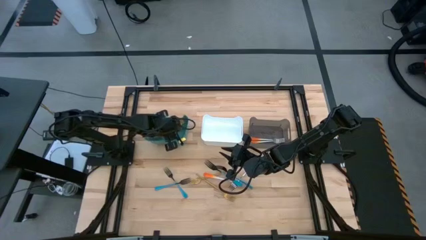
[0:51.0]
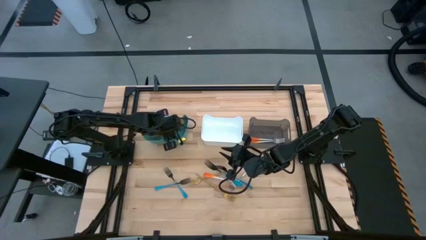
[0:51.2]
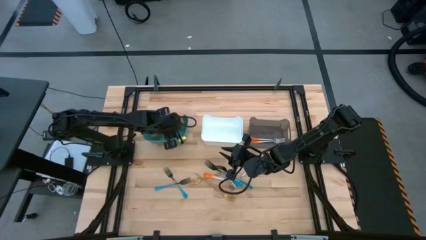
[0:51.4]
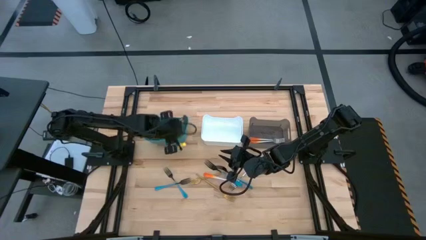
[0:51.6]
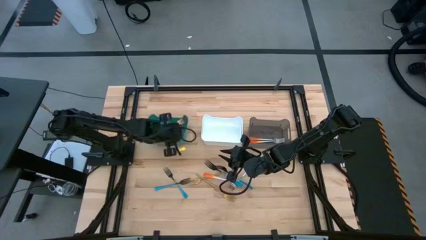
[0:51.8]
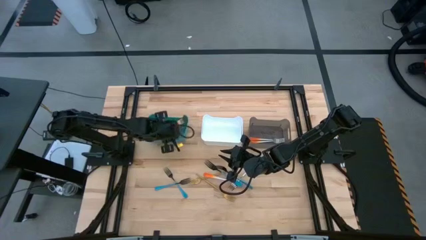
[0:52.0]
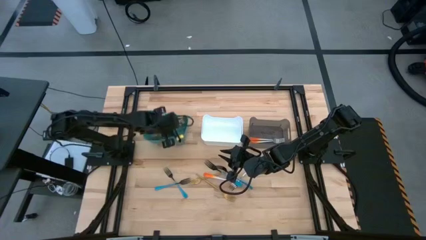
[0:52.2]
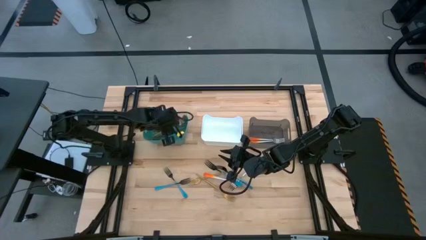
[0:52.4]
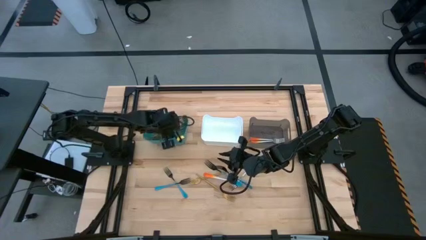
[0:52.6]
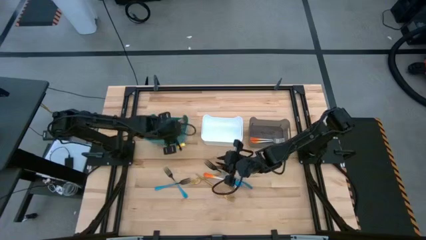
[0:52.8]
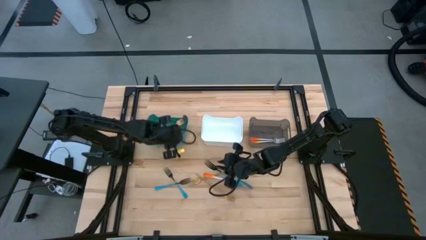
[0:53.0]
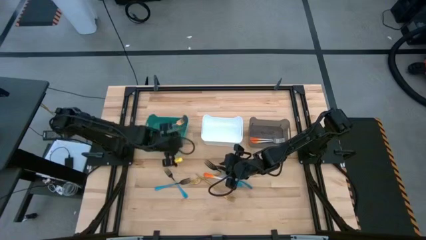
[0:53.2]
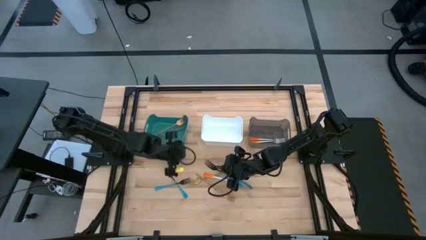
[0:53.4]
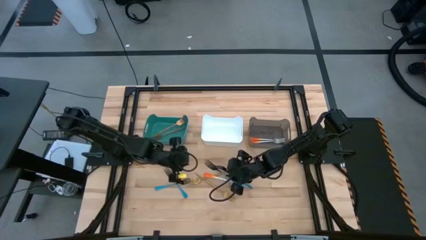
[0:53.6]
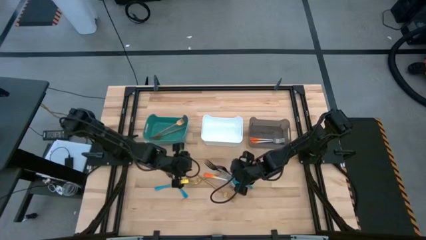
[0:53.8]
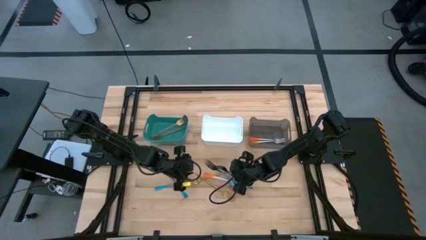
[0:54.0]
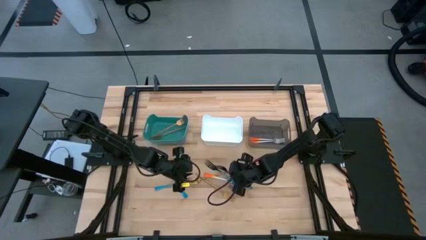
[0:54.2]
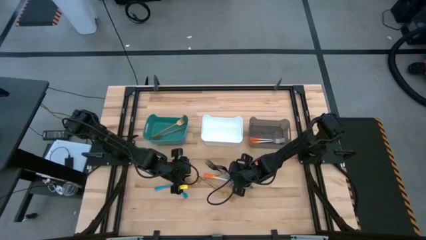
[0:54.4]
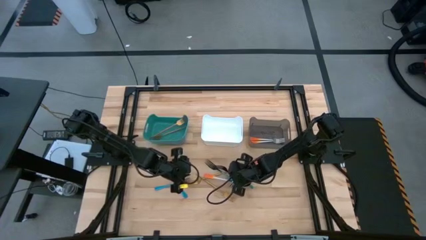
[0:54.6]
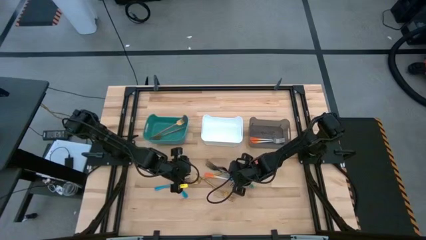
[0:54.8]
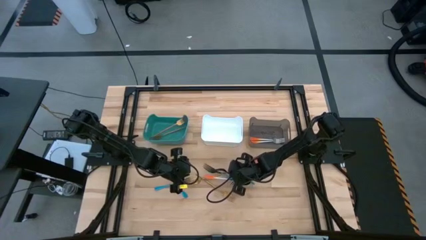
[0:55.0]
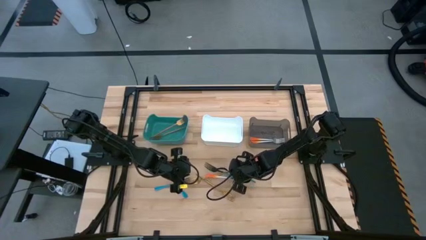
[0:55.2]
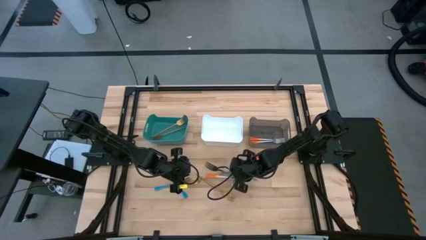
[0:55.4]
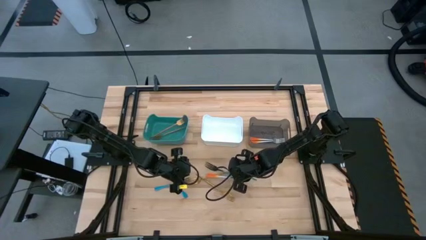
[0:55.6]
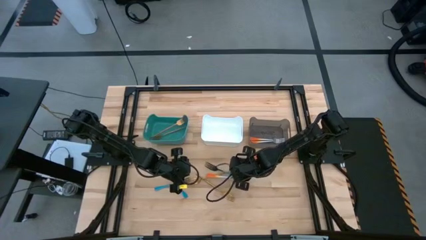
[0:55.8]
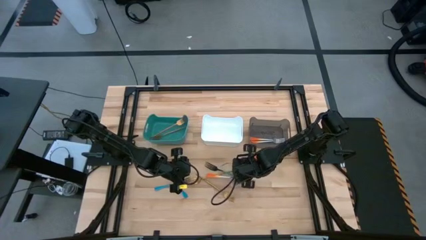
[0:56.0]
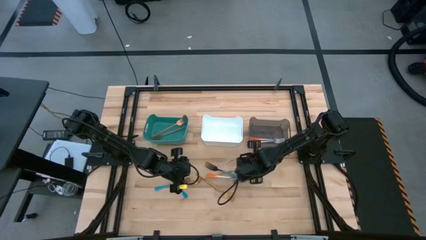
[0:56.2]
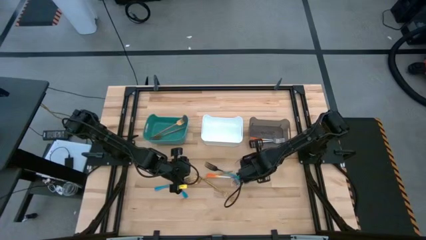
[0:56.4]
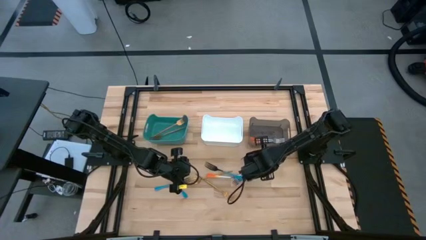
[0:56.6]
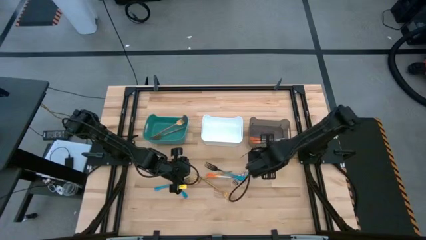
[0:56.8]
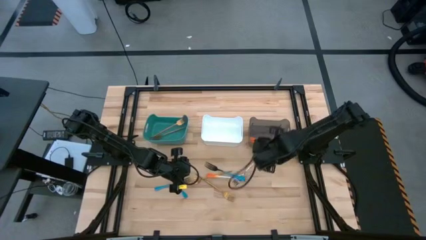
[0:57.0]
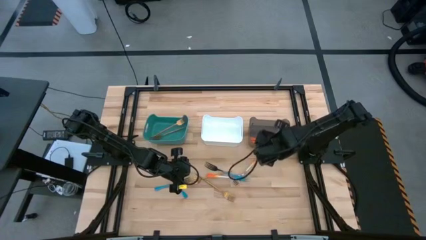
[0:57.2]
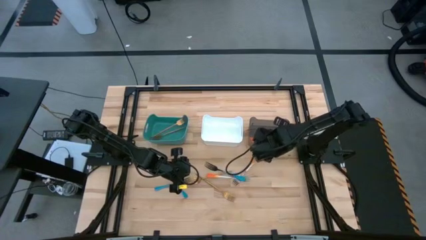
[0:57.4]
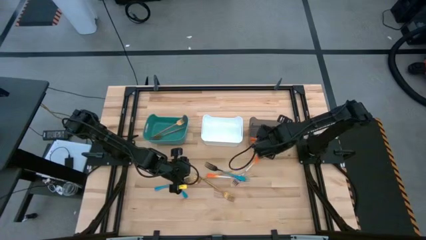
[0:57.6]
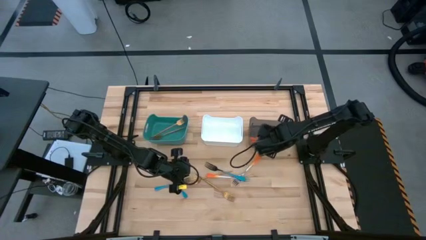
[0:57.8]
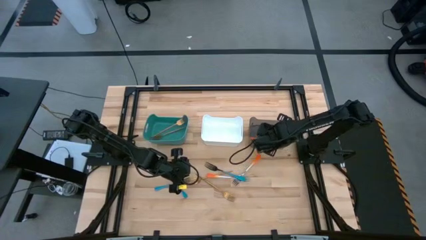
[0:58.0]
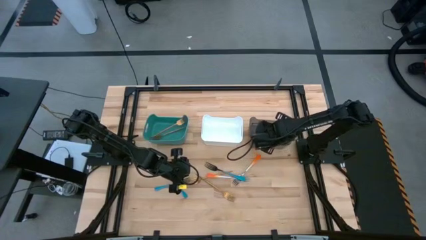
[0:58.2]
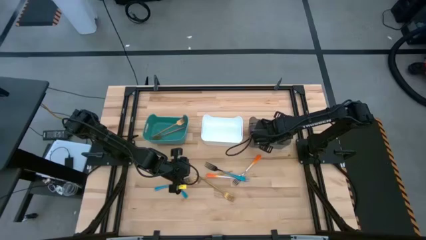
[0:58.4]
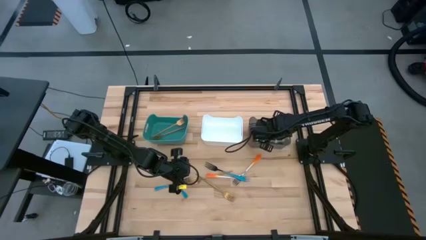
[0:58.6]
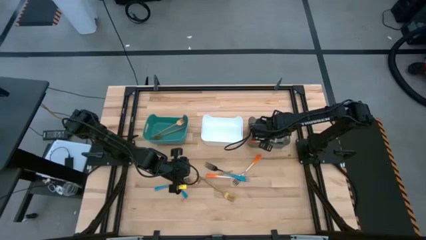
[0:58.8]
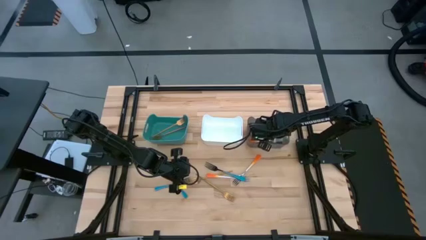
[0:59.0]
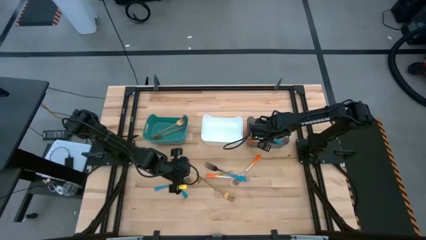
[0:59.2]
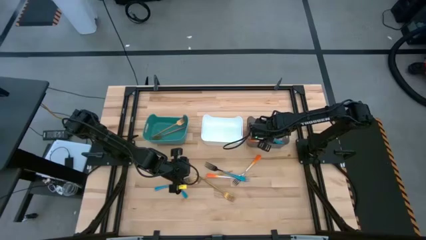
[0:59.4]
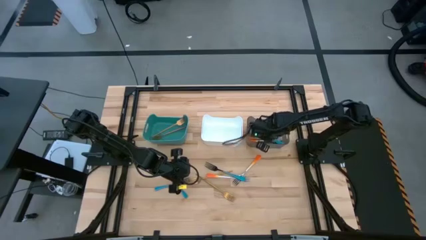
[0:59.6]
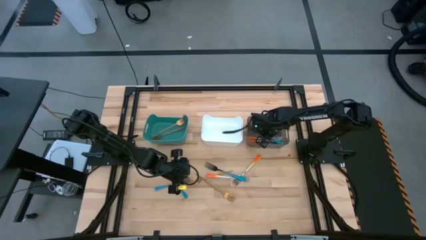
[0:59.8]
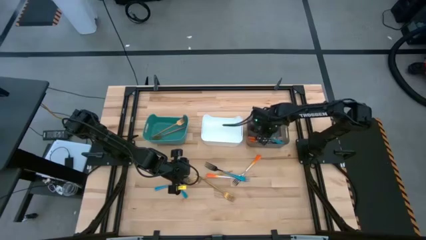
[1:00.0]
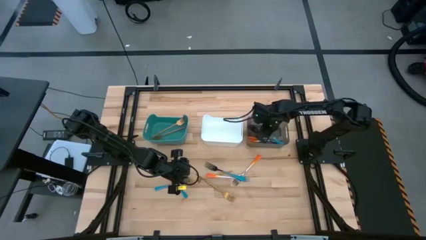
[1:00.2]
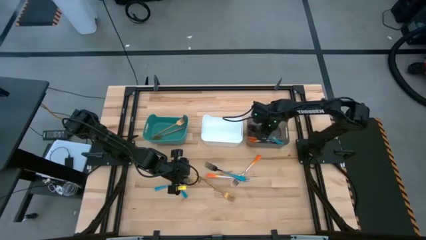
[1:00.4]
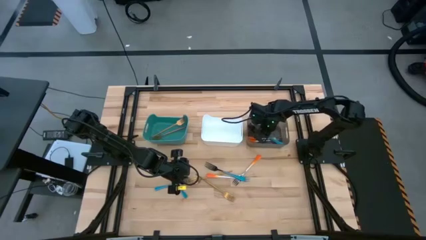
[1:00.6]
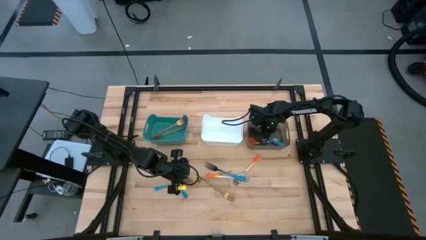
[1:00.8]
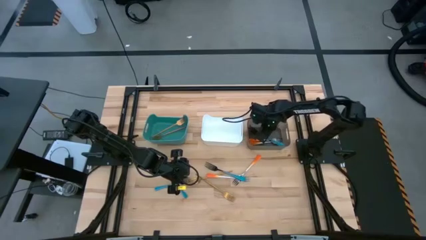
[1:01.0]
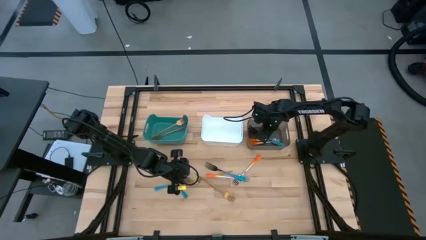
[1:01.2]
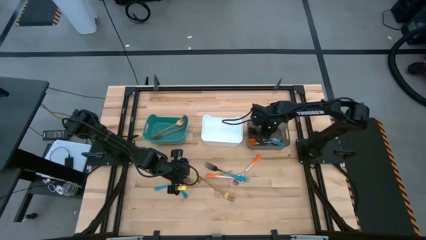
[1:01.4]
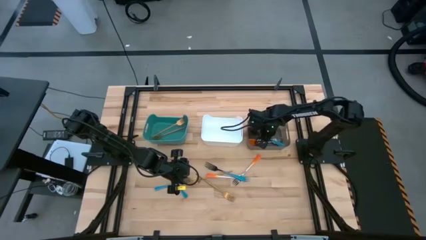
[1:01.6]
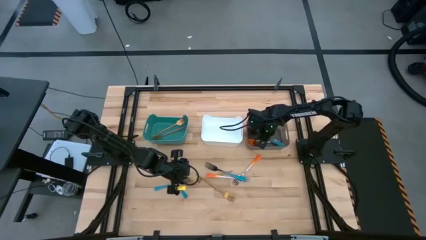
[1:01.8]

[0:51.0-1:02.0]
Task: Sort silverware by color (type)
Put the right blue fork into the white bin

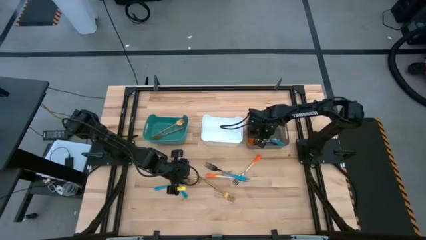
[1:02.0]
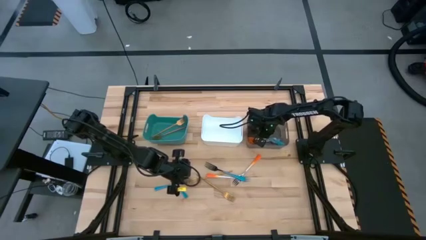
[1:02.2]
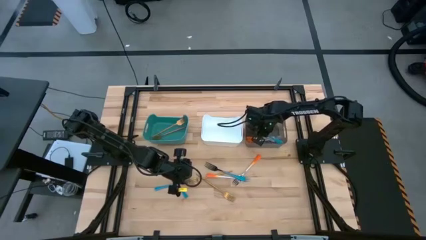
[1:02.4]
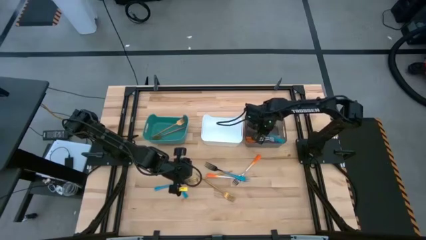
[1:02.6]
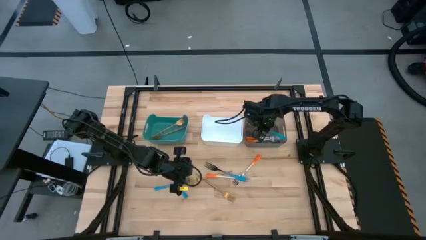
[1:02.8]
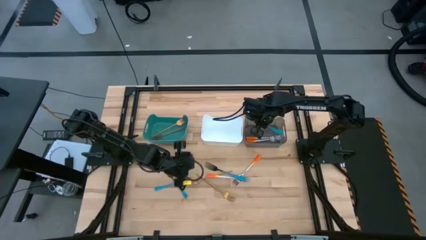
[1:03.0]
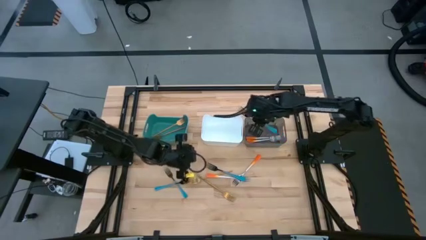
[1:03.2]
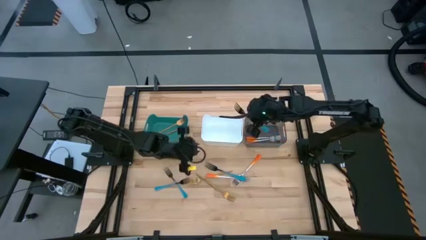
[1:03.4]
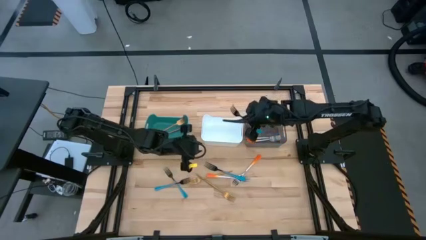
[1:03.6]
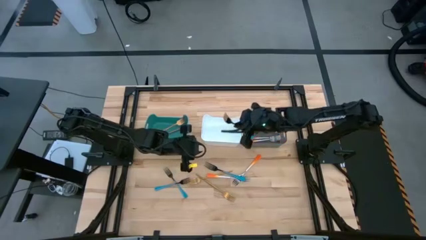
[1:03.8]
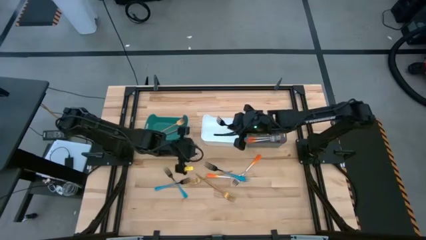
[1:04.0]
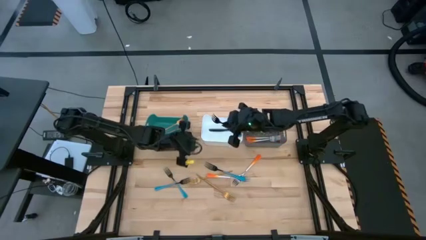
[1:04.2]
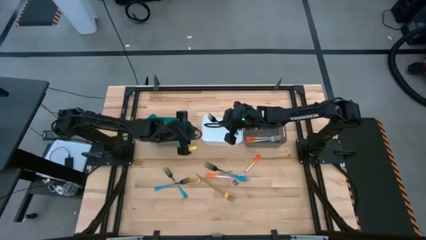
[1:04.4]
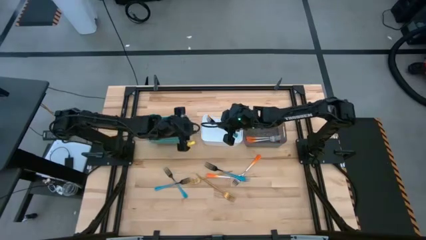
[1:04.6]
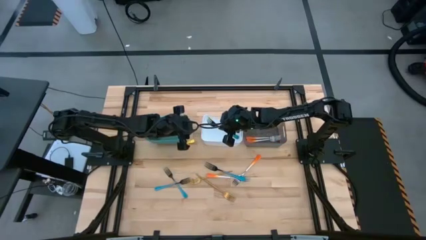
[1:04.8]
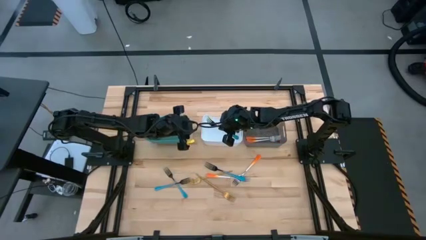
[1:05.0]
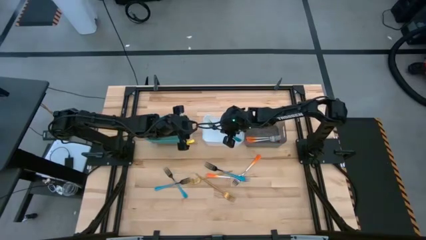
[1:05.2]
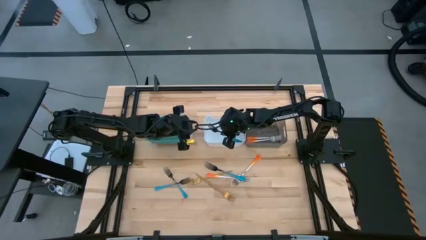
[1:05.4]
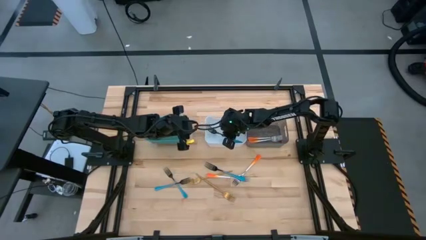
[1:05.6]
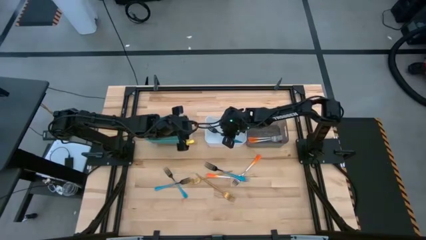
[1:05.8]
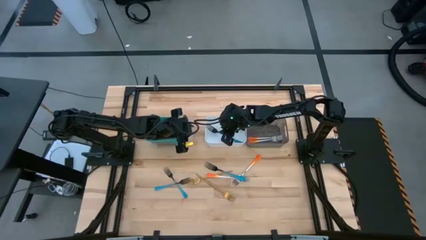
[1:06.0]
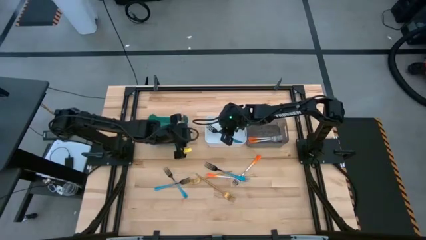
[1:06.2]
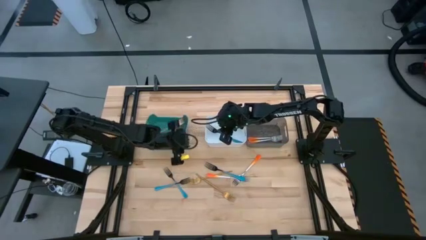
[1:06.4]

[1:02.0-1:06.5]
Put the right blue fork into the white bin
